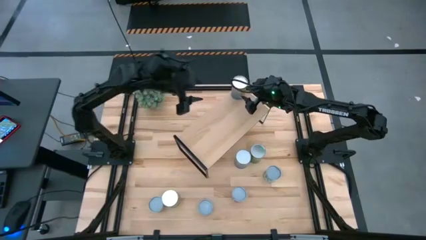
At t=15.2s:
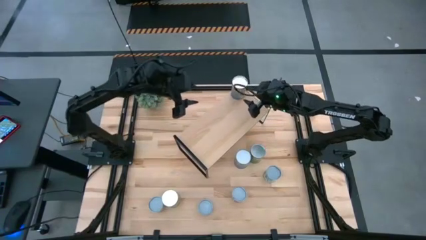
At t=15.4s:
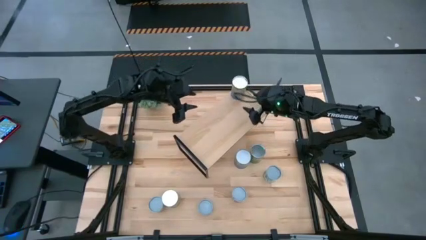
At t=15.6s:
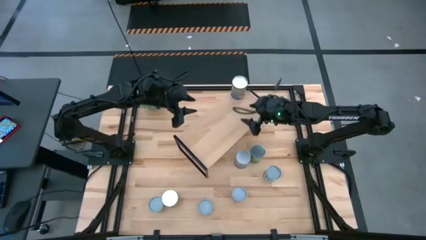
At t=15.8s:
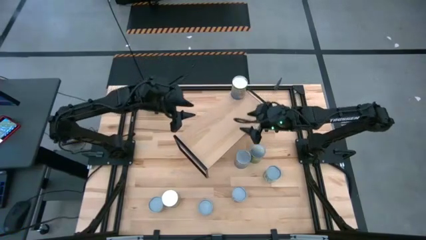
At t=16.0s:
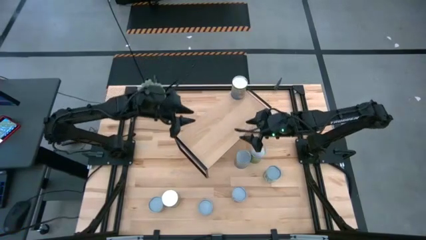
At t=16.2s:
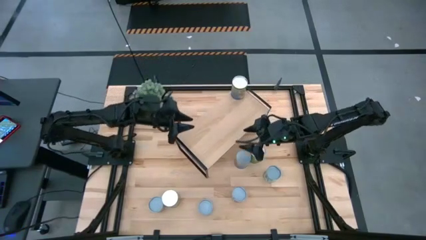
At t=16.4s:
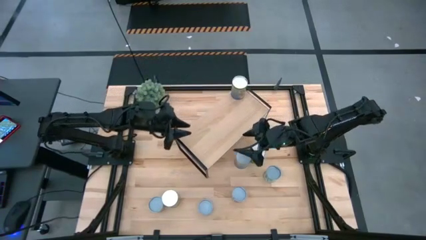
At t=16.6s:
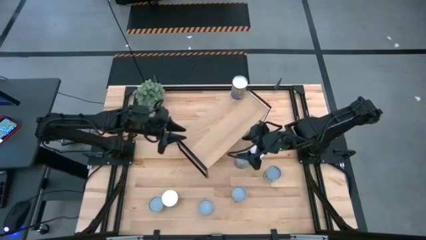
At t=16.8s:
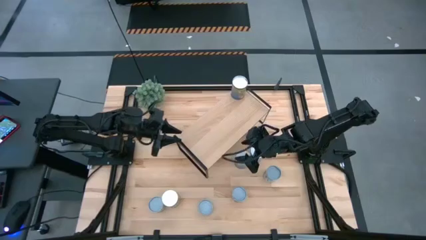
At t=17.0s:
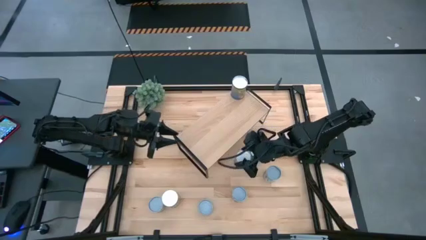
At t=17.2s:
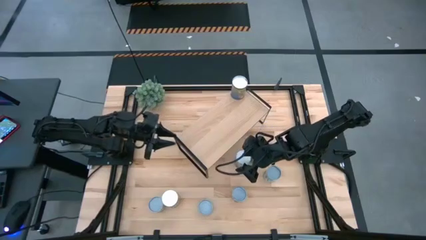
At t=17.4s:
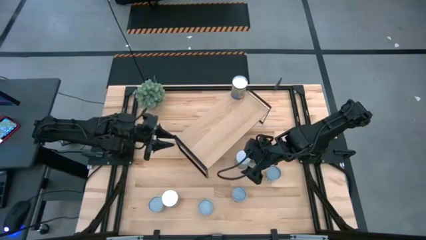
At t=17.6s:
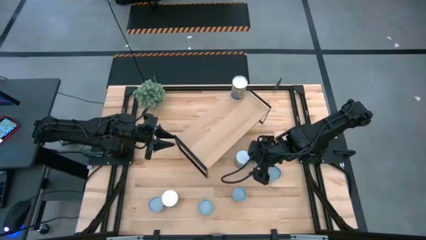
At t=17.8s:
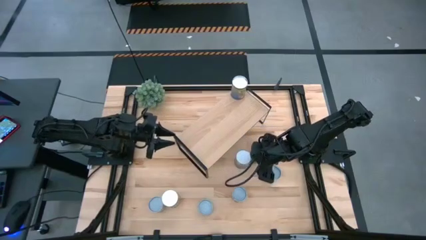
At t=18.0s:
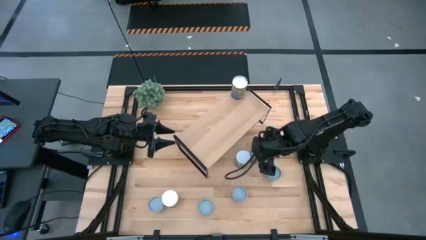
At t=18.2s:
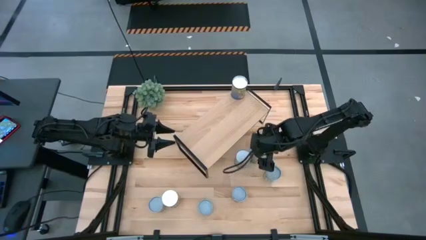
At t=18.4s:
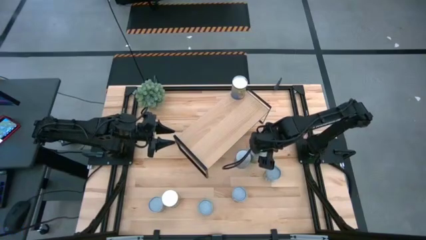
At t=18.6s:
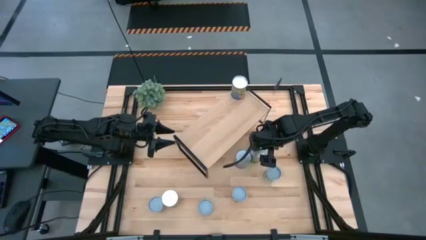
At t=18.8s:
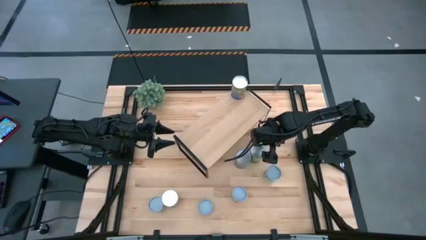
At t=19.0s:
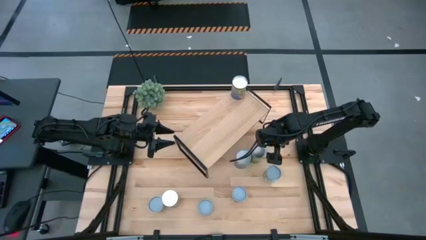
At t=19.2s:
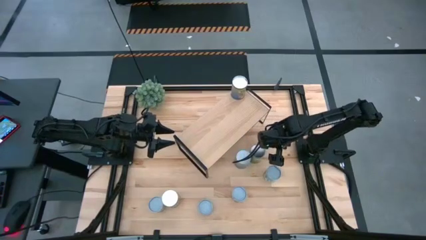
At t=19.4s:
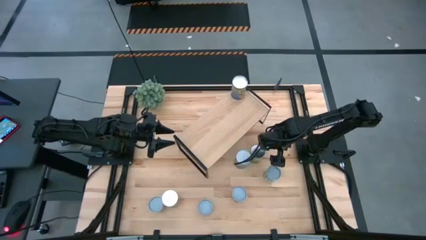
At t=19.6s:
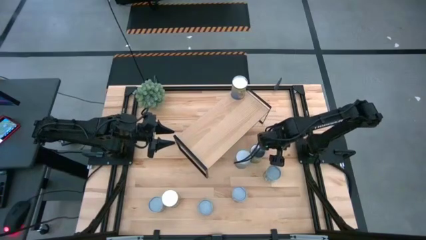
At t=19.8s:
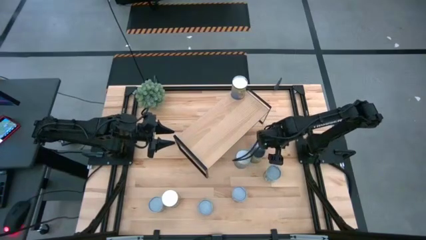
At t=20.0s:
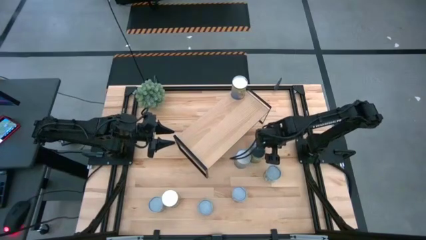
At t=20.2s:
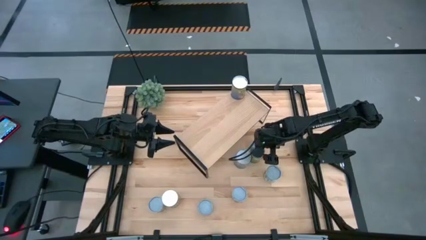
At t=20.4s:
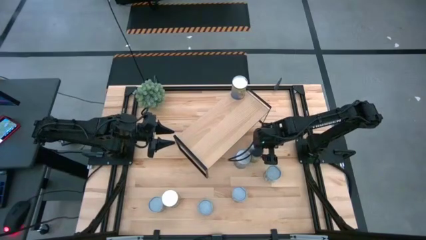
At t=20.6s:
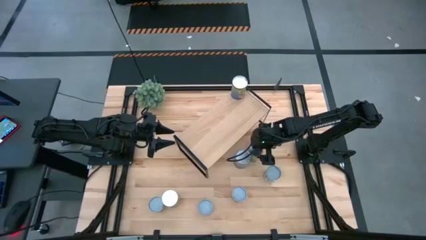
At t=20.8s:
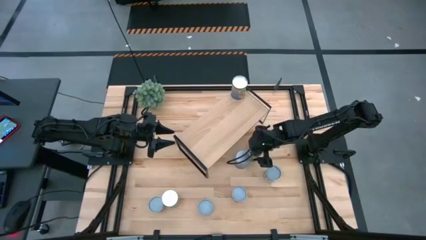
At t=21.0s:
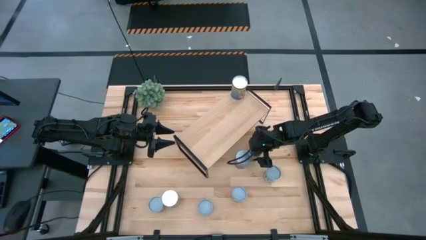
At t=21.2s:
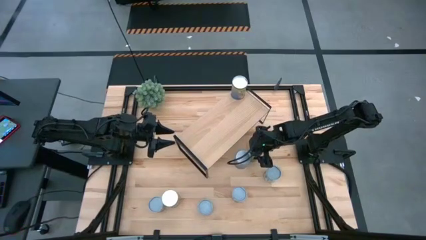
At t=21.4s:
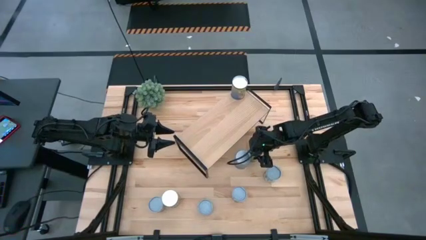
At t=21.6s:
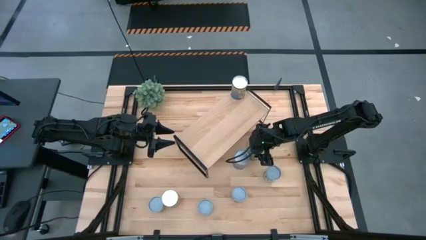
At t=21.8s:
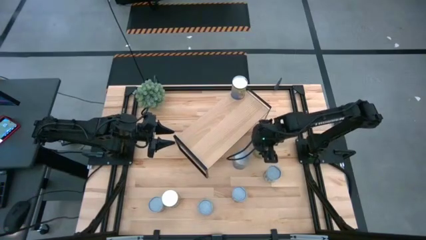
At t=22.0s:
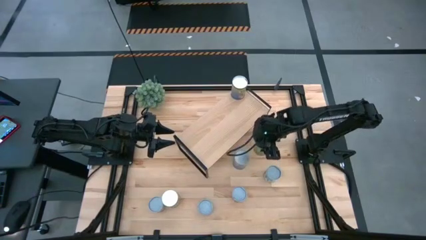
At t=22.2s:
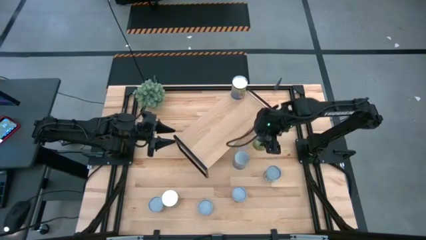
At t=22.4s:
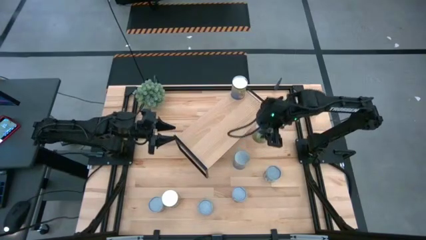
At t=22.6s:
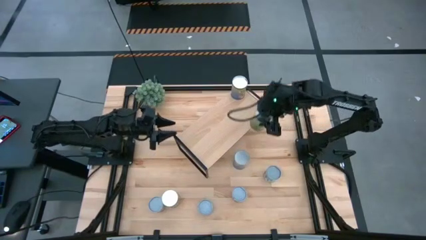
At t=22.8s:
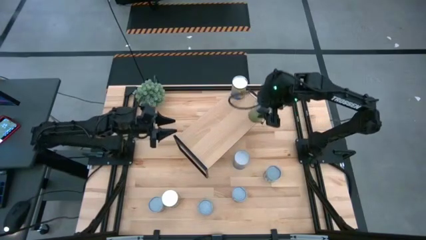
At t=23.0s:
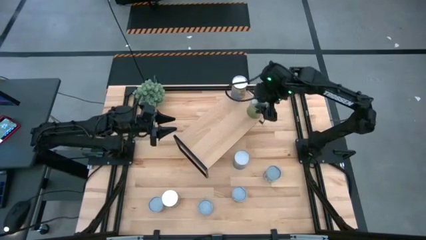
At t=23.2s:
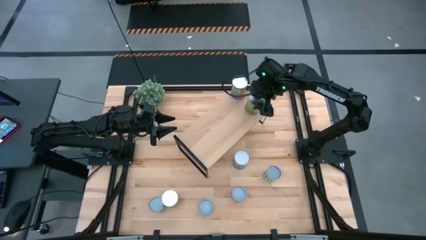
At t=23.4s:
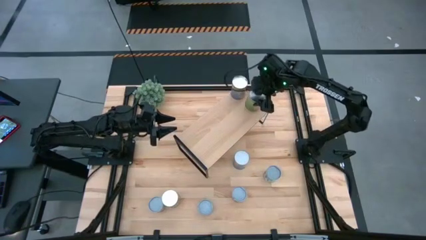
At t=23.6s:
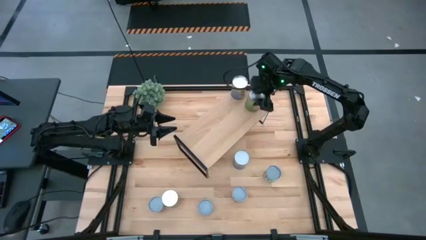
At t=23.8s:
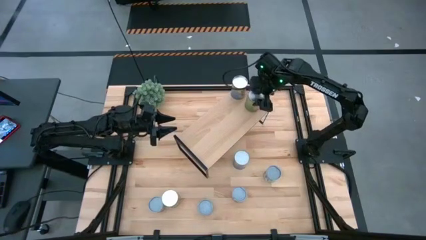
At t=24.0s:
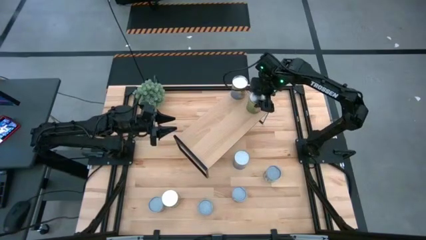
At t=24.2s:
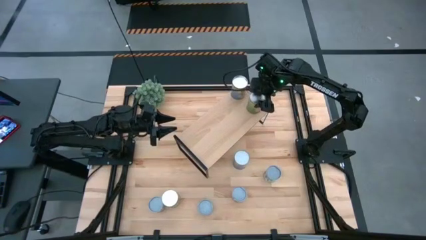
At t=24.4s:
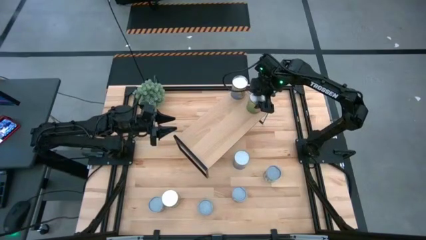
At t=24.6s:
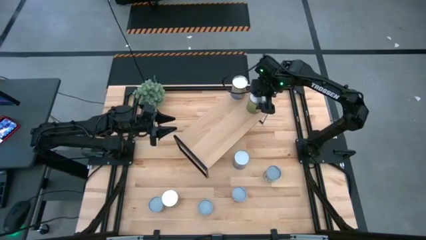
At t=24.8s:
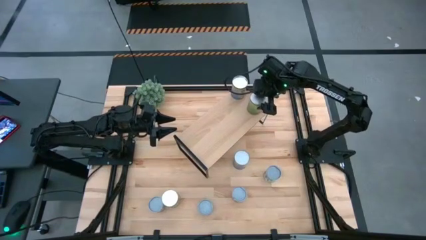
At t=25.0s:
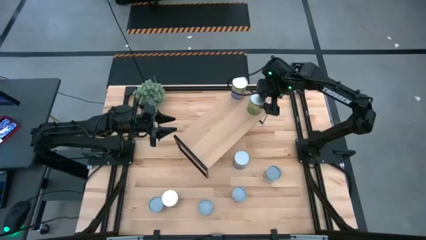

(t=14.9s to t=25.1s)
Task: Pick and place cans onto a shelf
Put the canned oranges on the shelf

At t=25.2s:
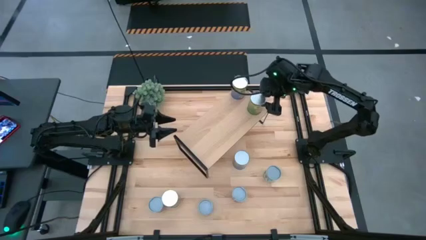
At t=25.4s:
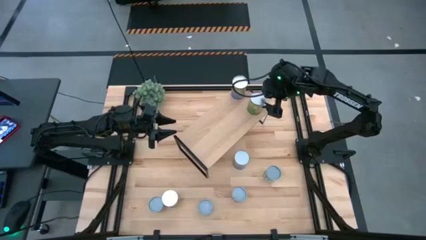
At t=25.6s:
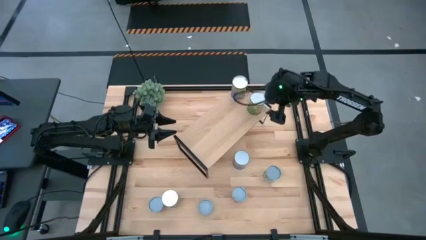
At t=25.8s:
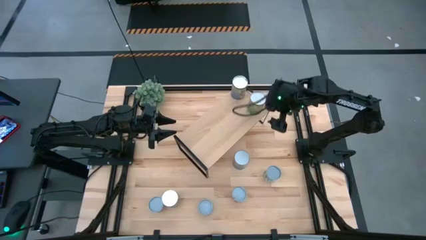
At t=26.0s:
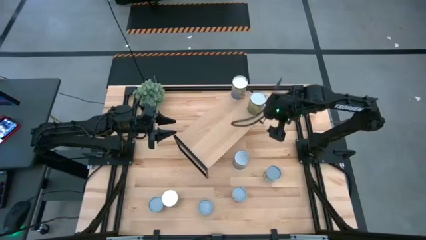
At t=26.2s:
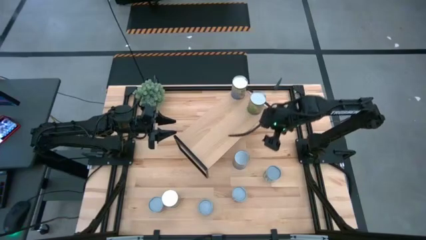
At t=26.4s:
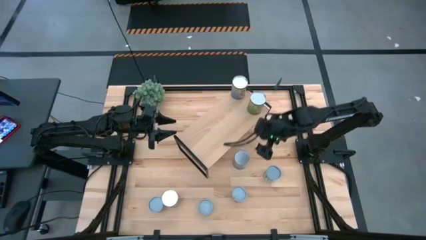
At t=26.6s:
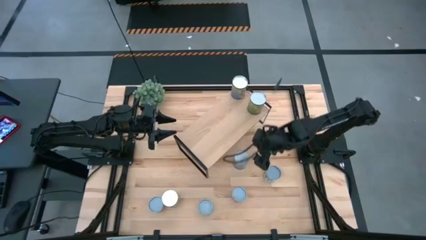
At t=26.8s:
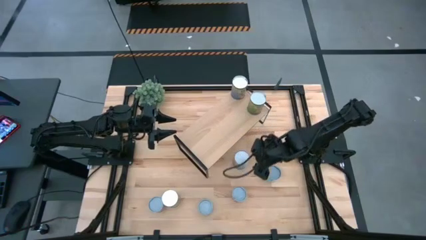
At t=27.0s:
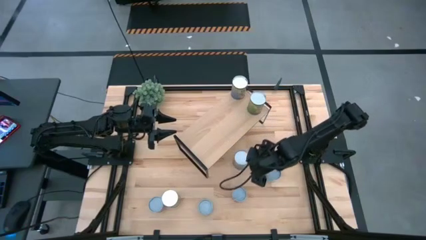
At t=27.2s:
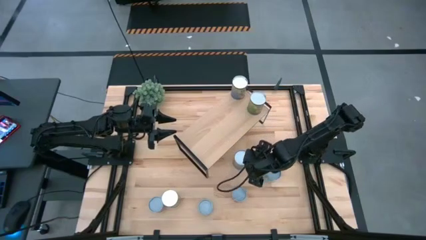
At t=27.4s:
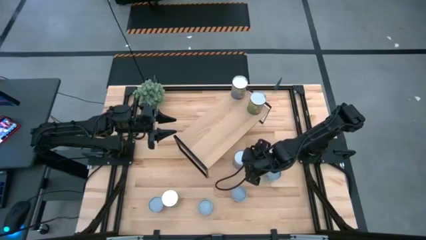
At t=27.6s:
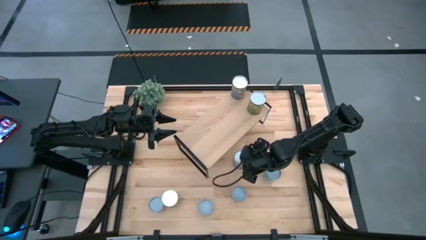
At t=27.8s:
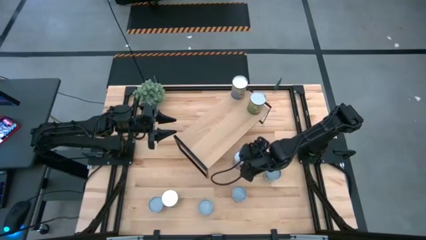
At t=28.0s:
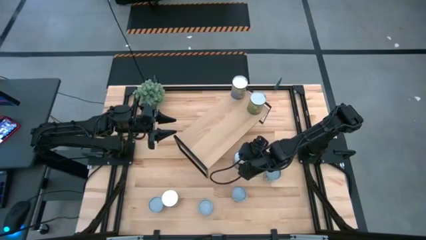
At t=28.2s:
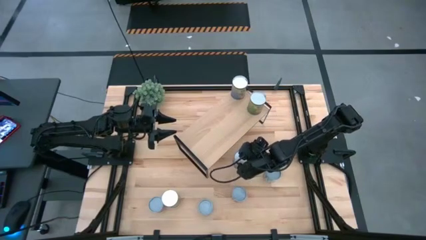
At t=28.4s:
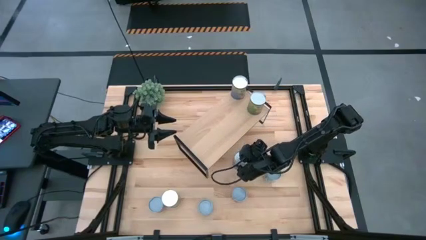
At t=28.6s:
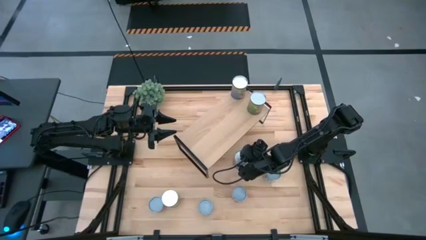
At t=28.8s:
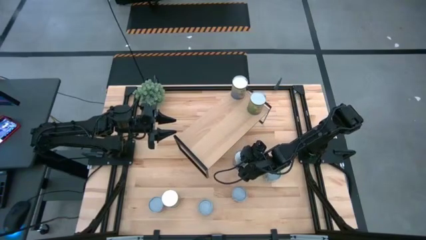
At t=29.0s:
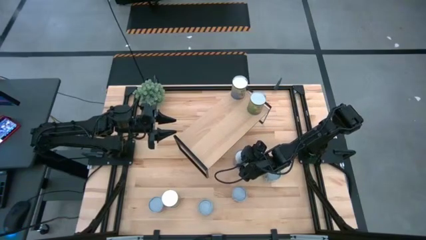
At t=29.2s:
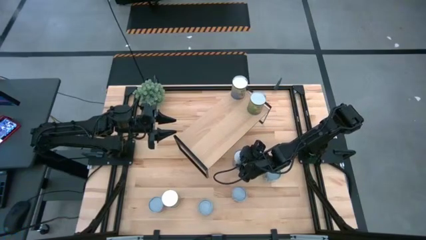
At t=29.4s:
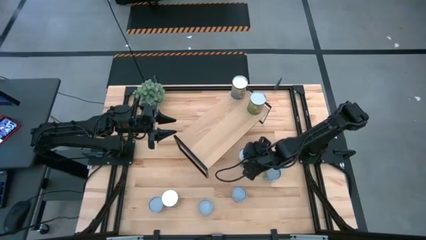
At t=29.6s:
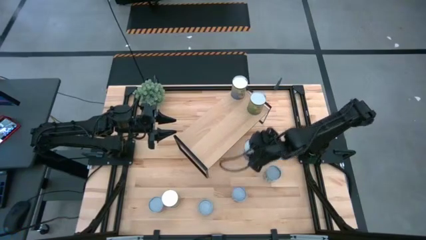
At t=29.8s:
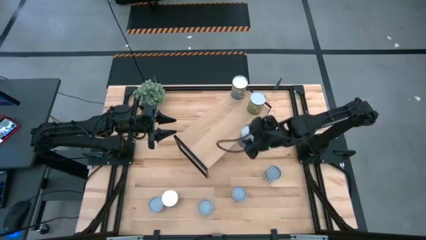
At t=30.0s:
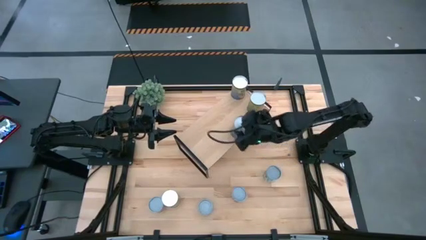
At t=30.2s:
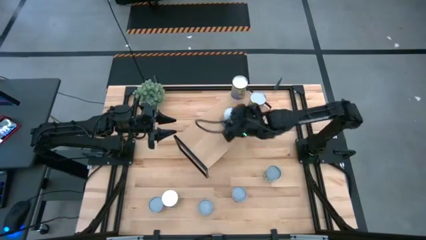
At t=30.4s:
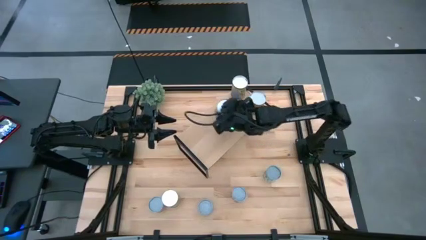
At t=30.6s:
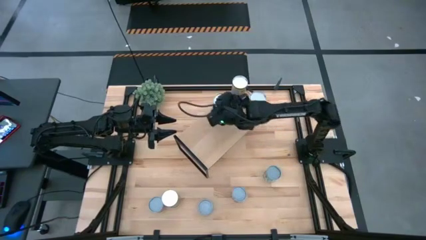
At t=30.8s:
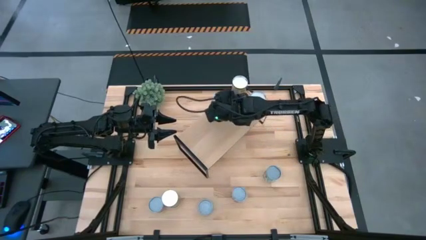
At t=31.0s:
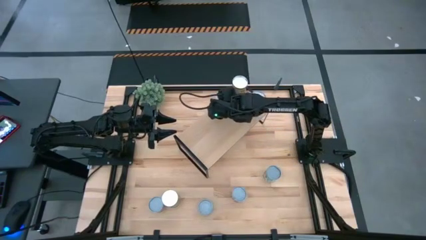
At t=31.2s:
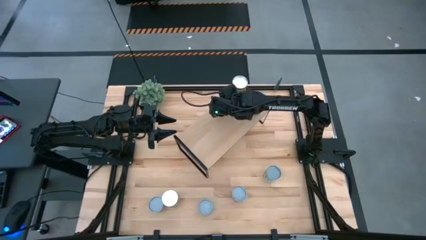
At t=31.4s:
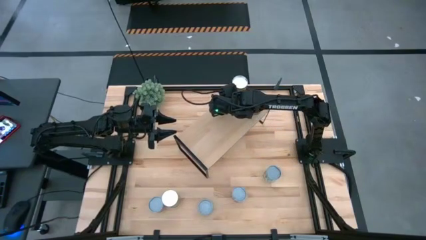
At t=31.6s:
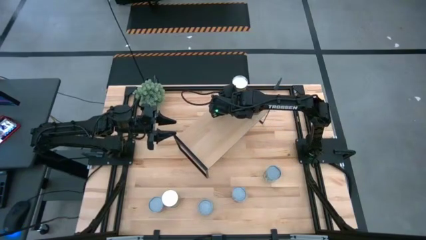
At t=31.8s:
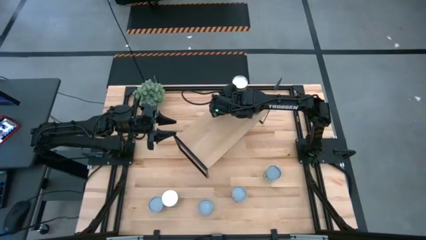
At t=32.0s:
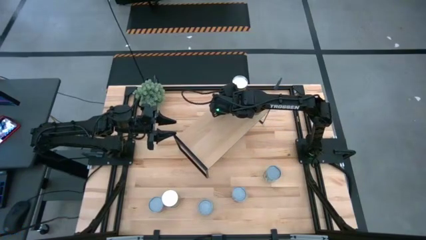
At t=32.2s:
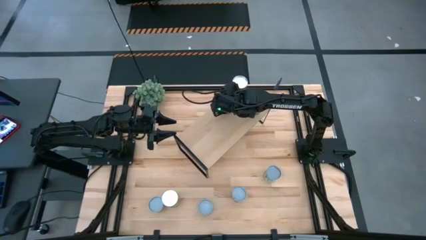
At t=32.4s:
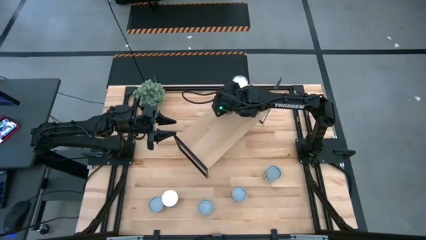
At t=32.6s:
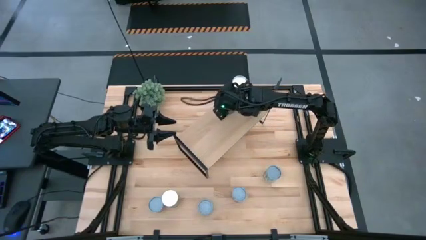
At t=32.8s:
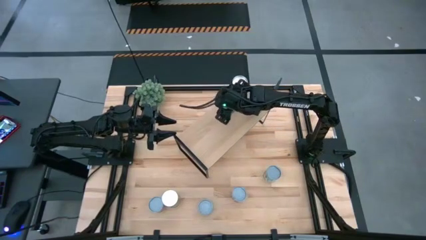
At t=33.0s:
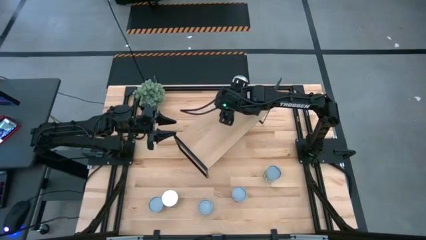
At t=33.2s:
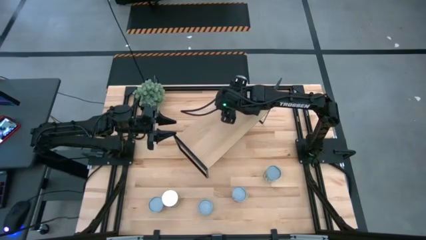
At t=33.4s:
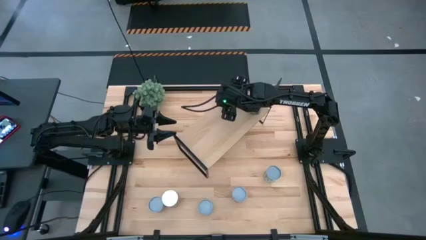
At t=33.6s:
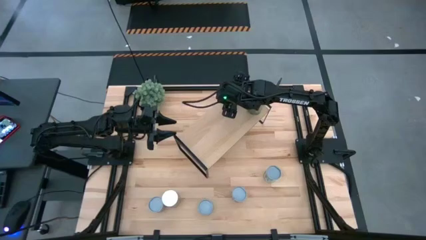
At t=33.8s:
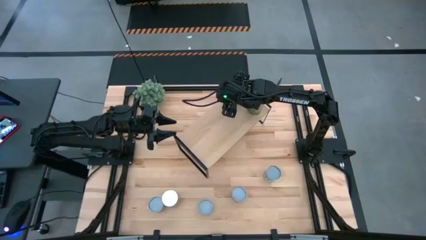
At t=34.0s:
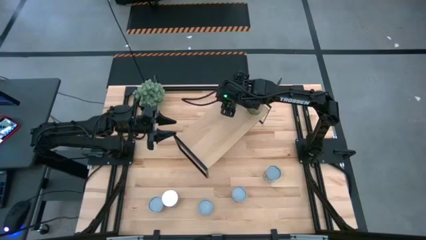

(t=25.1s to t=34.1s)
Put the big canned peas on the shelf
